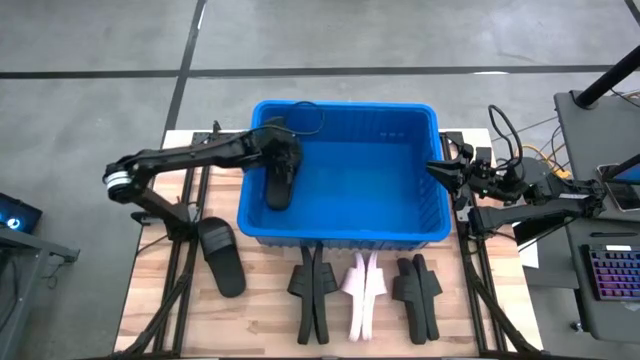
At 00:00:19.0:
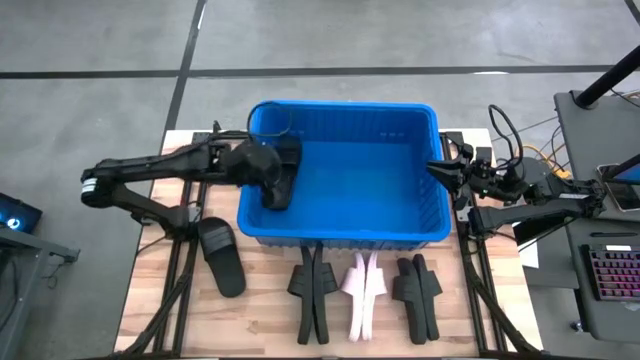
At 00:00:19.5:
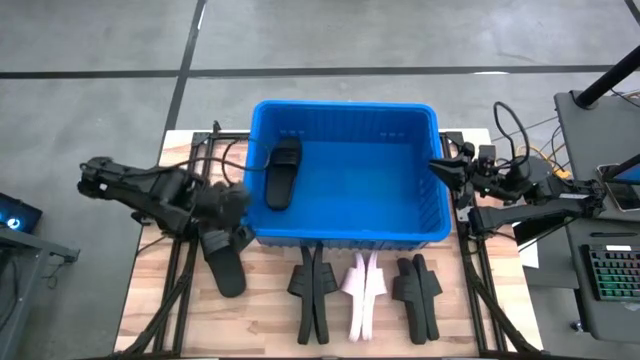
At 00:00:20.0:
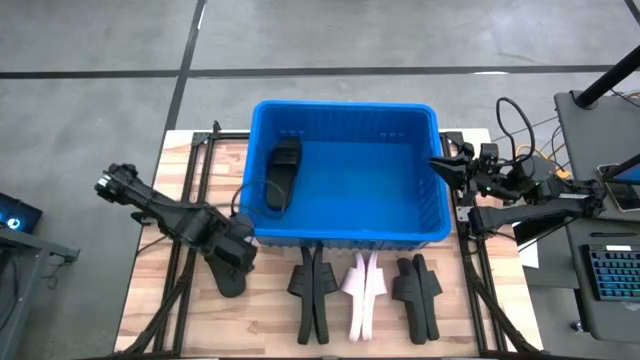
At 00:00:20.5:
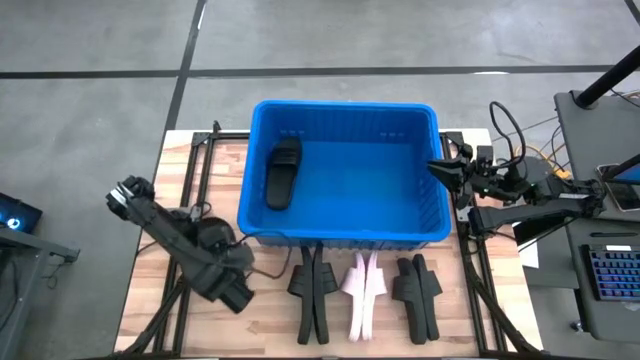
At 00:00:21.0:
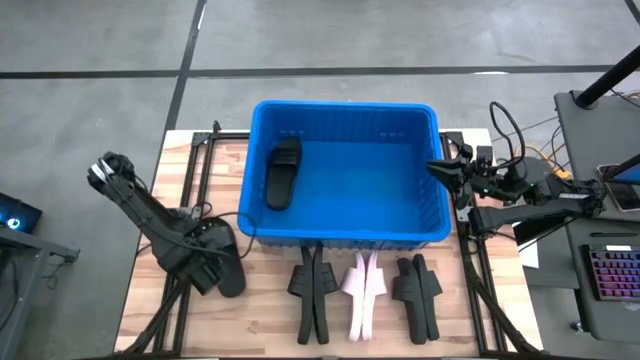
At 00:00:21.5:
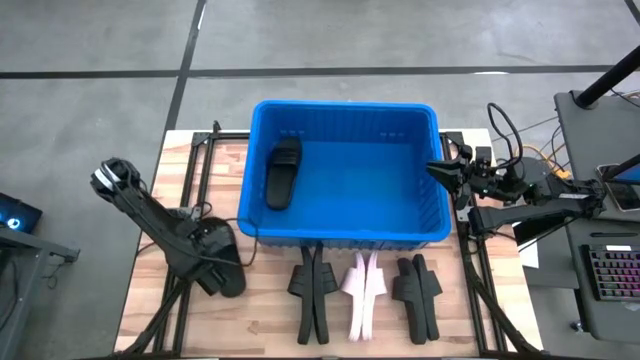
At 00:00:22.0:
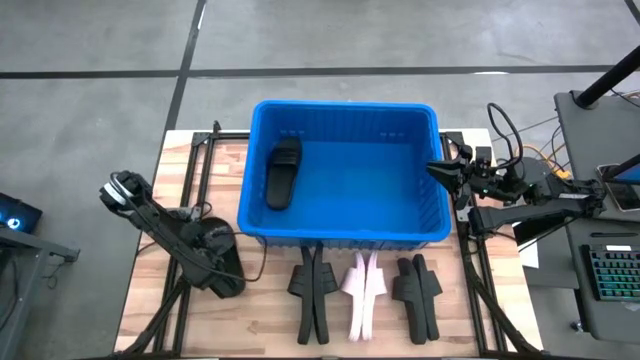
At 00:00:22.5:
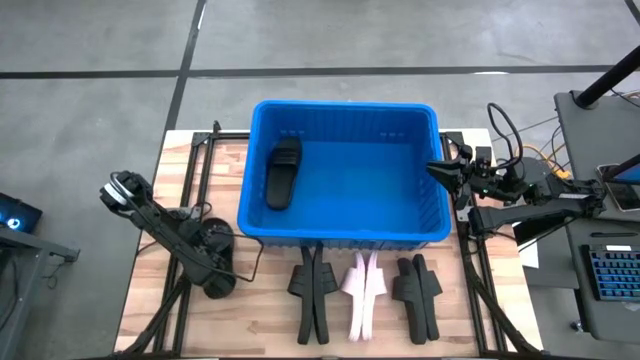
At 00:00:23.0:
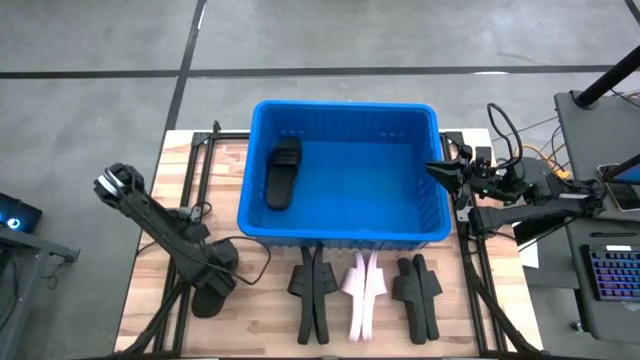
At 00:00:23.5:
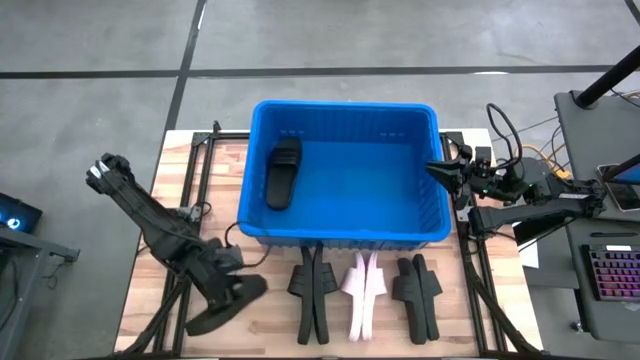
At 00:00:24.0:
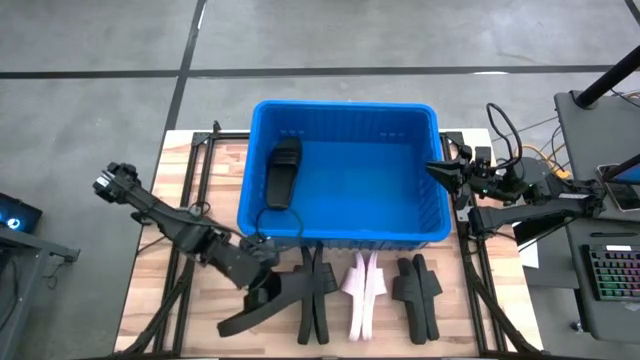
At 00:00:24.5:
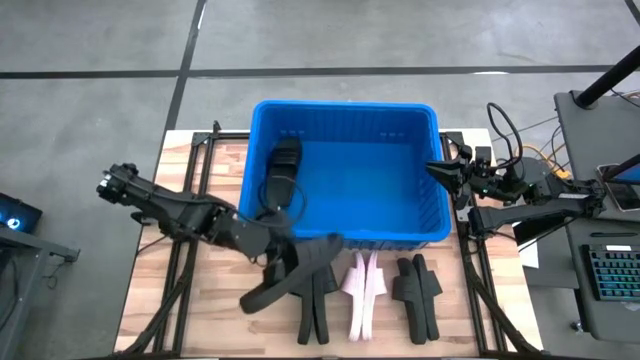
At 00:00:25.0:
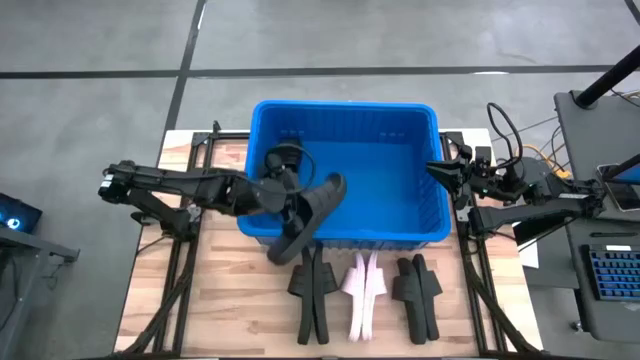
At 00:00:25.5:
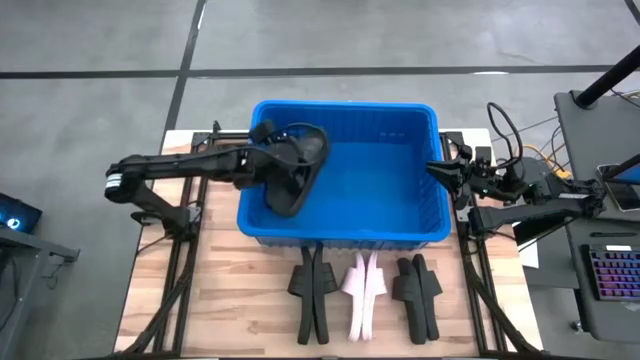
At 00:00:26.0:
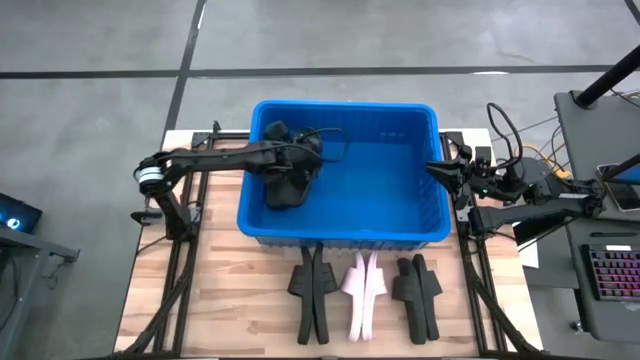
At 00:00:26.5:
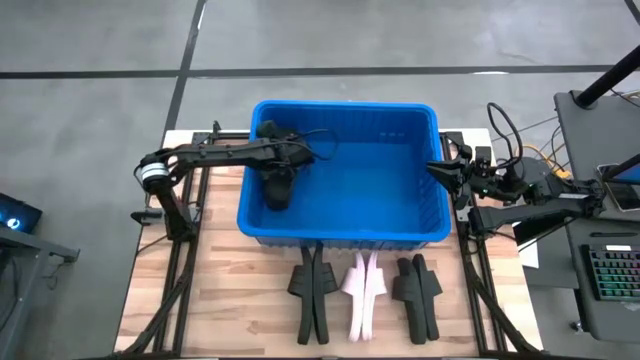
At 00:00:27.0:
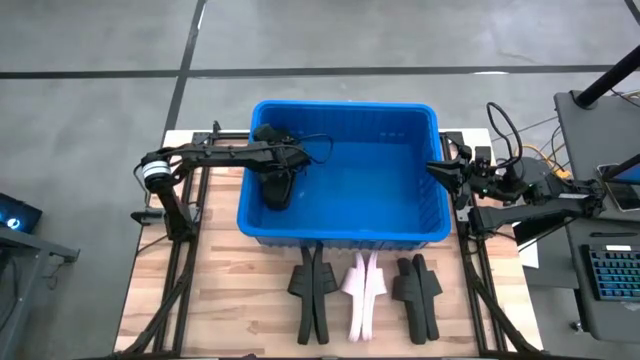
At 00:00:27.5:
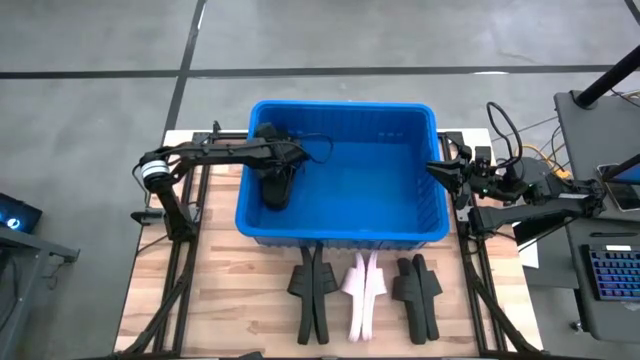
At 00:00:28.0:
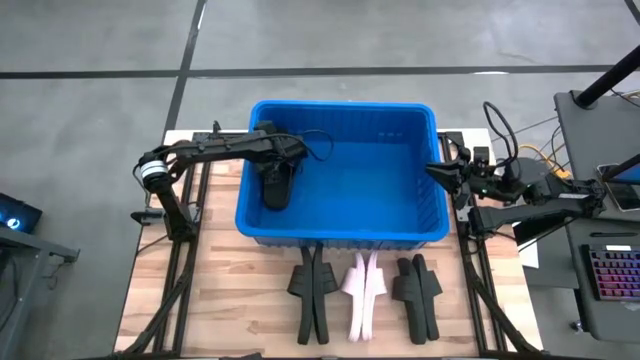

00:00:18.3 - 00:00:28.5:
Task: Pick and place slides into bin
Put the black slides into the blue bin

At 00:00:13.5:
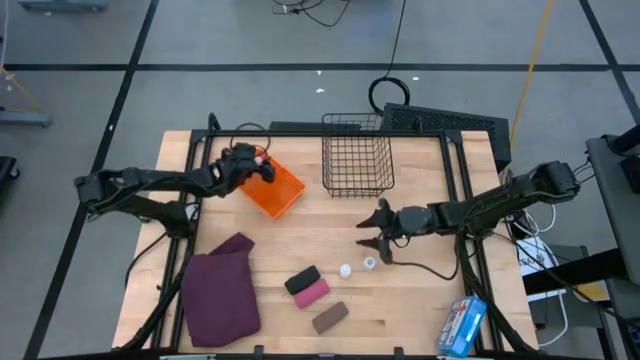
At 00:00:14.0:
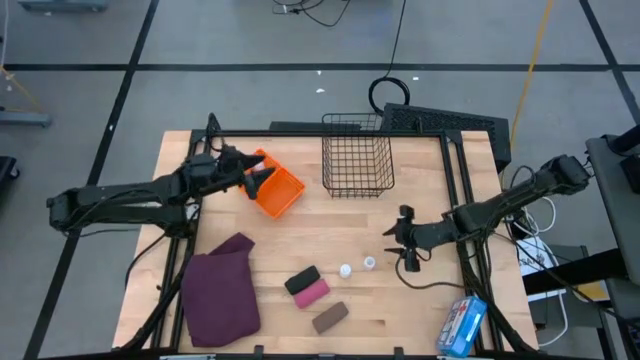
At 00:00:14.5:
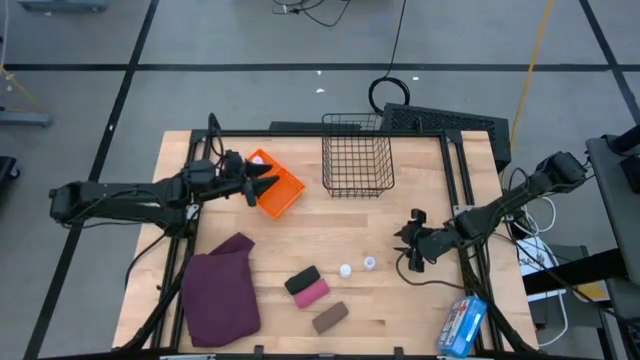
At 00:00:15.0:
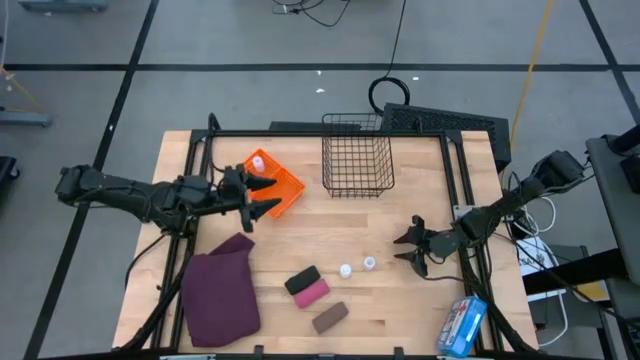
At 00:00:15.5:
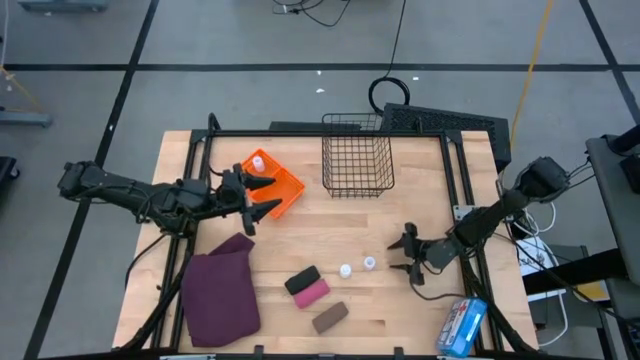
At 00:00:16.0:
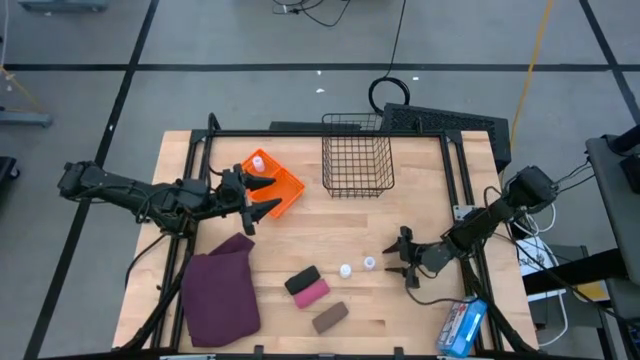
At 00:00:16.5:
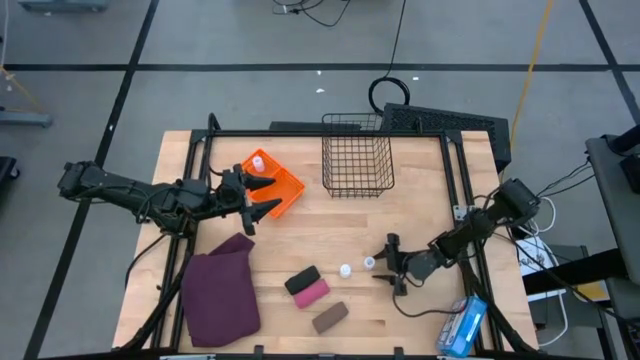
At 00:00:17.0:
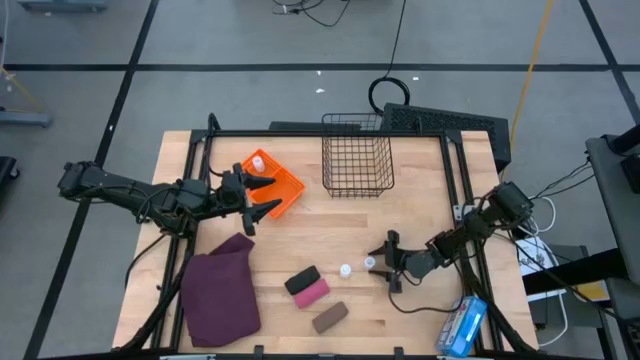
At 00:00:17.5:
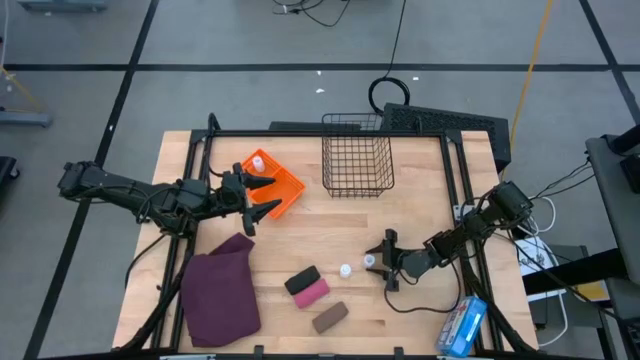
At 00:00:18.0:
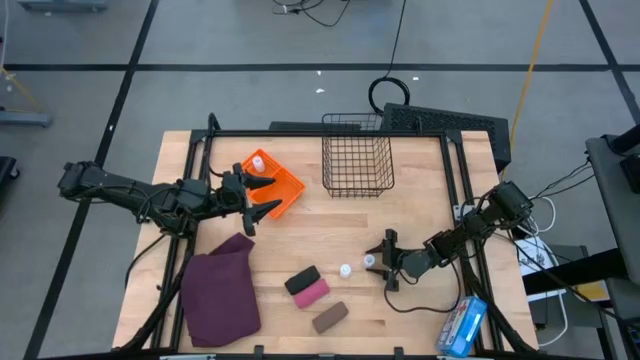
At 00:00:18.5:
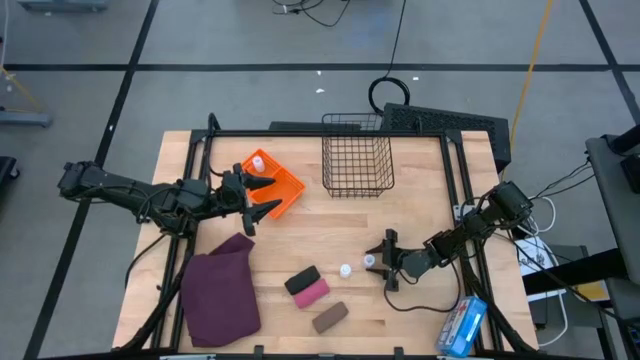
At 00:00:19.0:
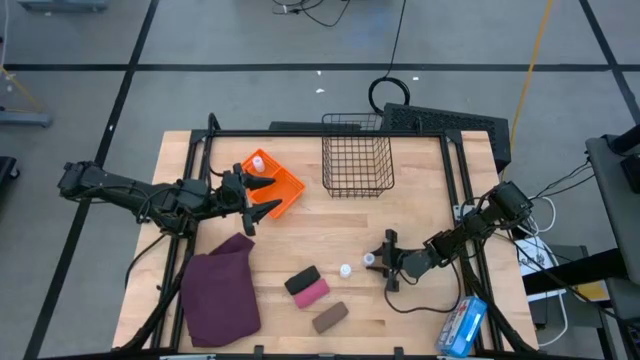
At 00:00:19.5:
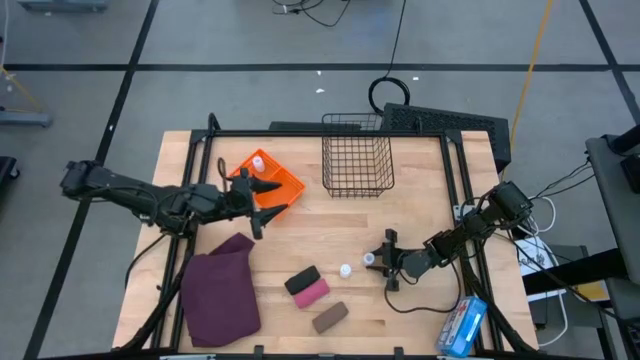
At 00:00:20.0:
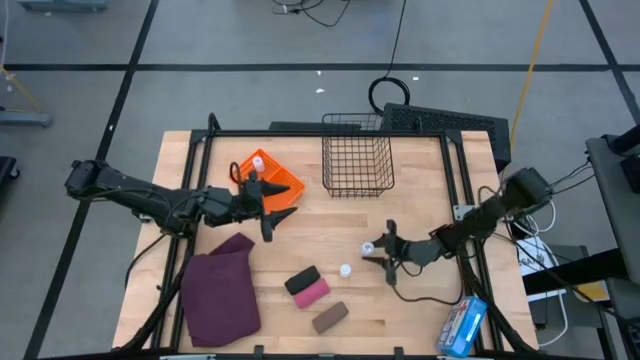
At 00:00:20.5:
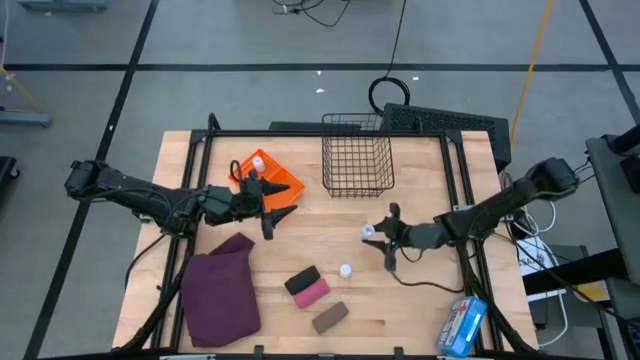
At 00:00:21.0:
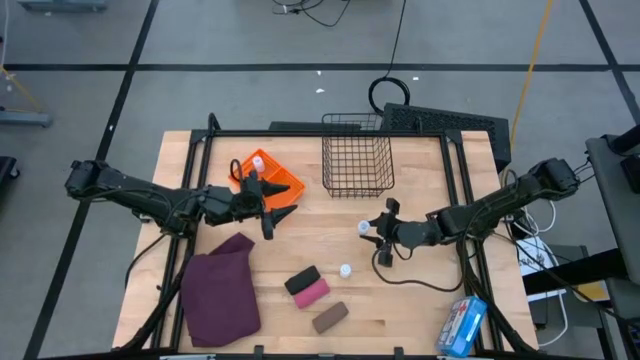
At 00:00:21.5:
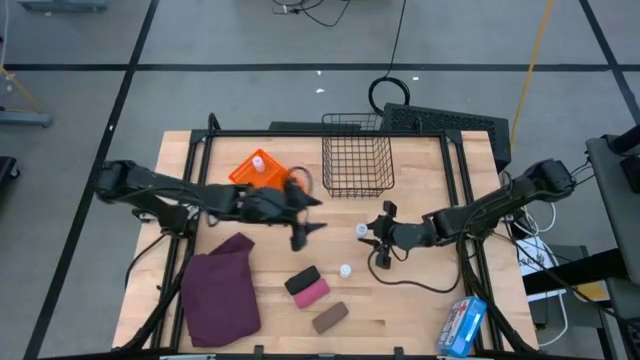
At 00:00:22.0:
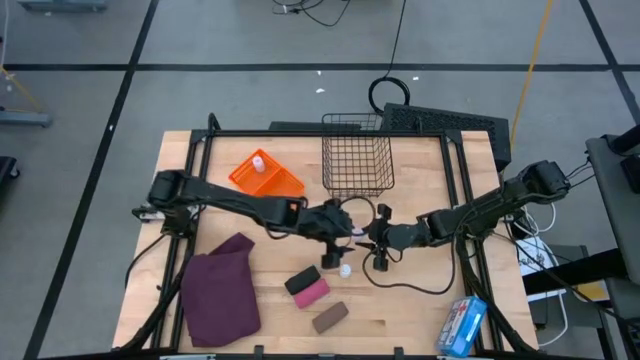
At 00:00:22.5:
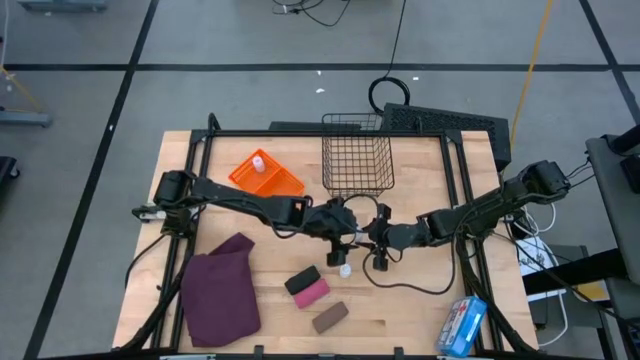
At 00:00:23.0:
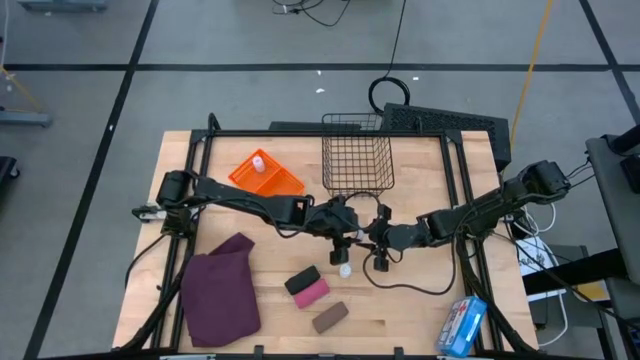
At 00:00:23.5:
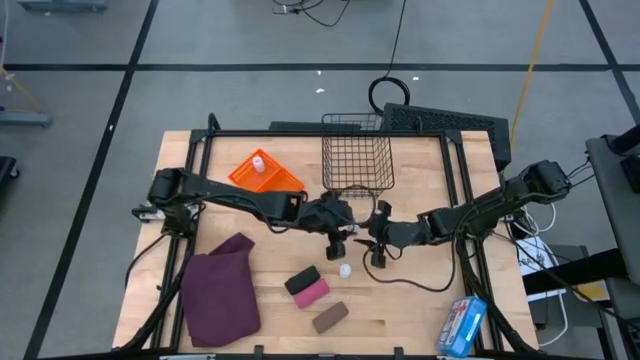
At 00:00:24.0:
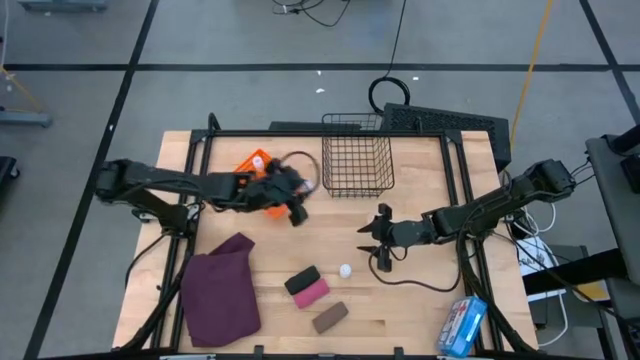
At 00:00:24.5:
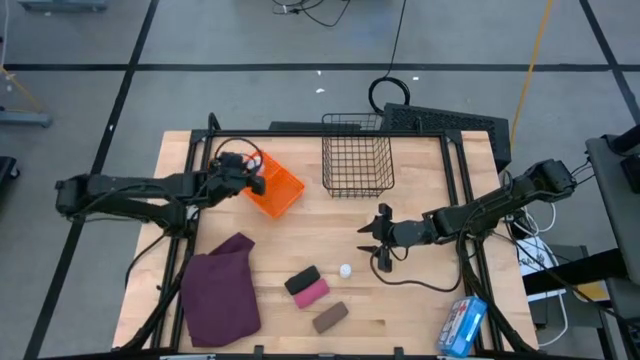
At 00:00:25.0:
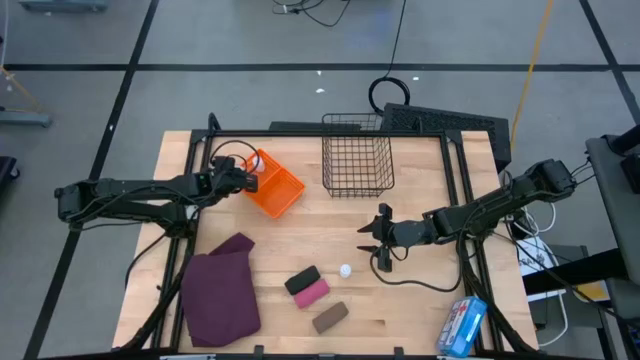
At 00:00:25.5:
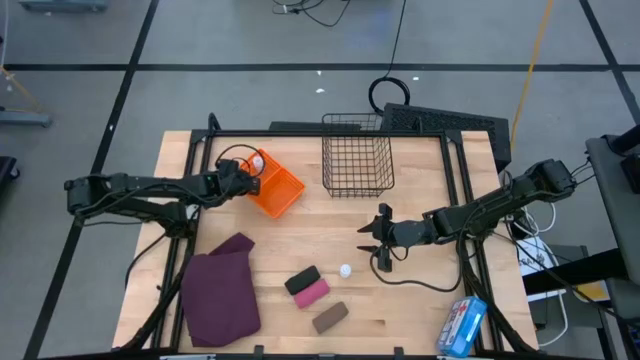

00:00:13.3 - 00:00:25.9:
Task: Pick & Place Medicine items
Put the white pill bottle into the top orange basket
